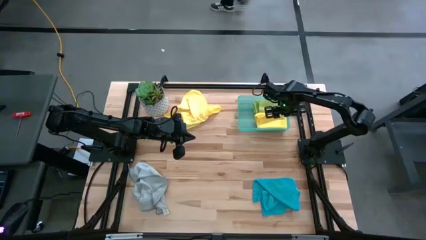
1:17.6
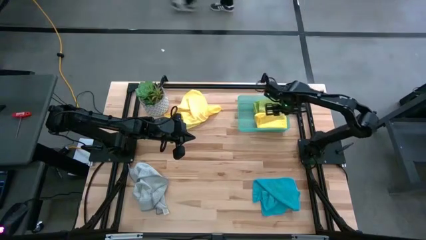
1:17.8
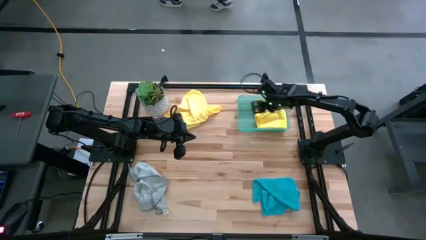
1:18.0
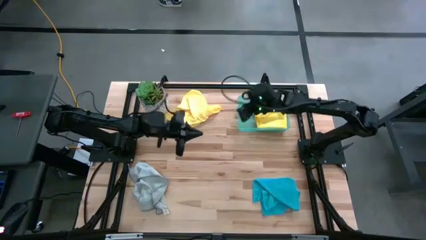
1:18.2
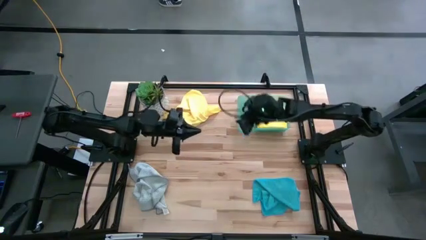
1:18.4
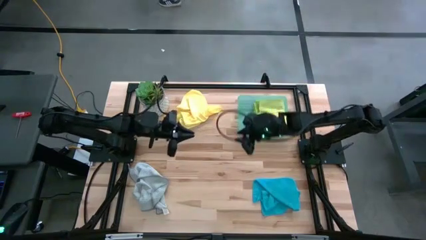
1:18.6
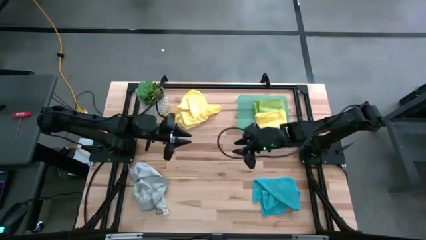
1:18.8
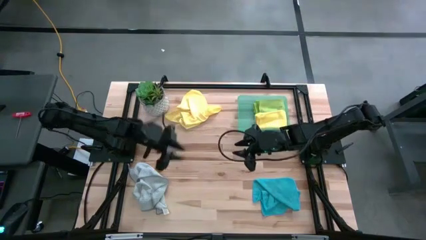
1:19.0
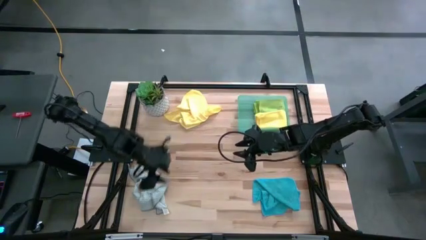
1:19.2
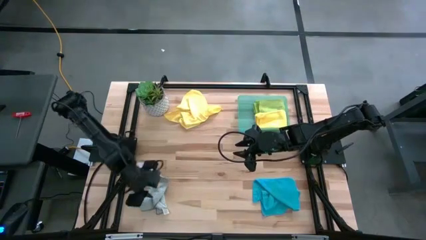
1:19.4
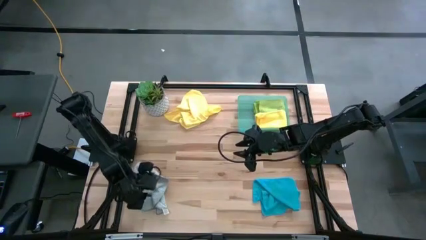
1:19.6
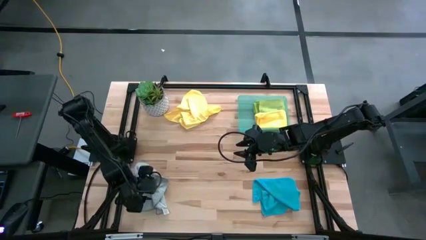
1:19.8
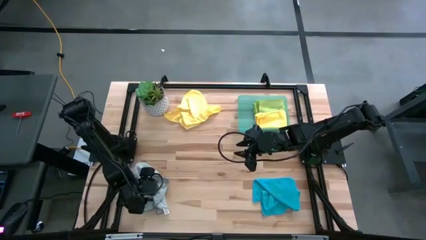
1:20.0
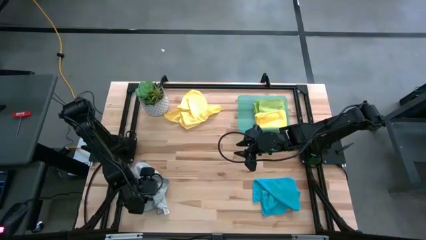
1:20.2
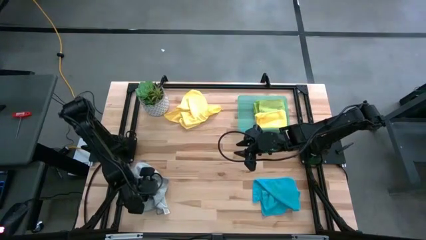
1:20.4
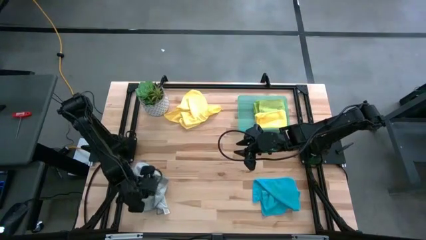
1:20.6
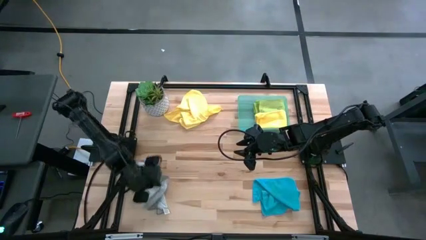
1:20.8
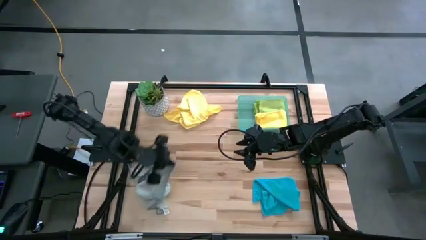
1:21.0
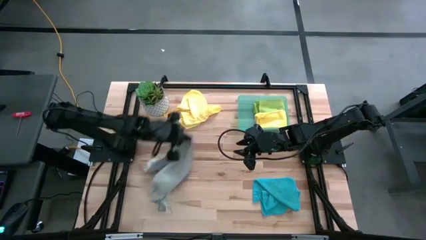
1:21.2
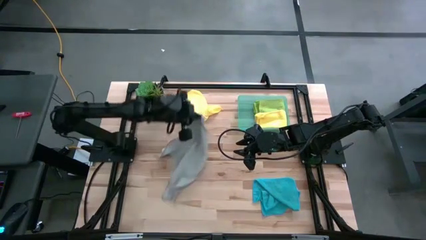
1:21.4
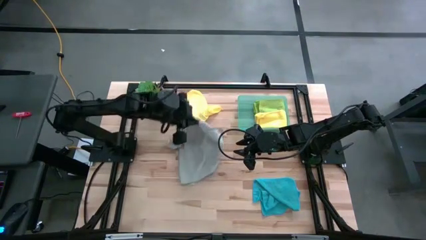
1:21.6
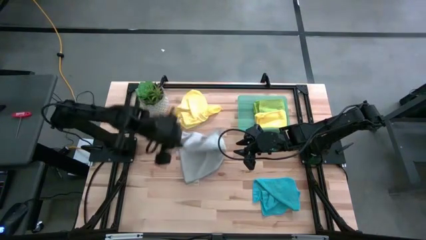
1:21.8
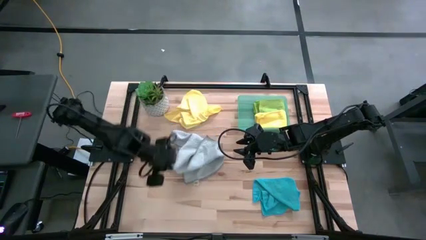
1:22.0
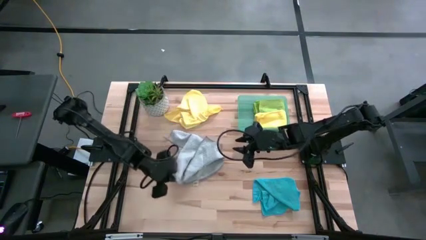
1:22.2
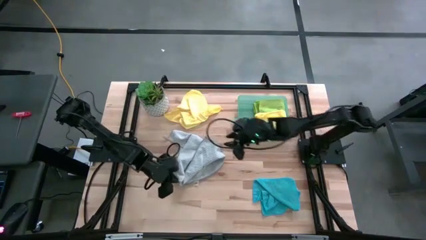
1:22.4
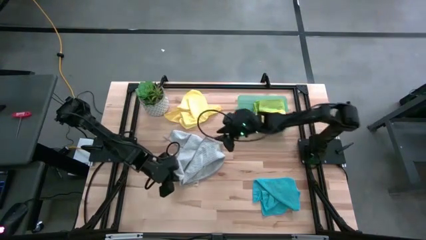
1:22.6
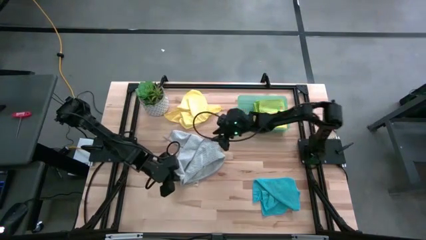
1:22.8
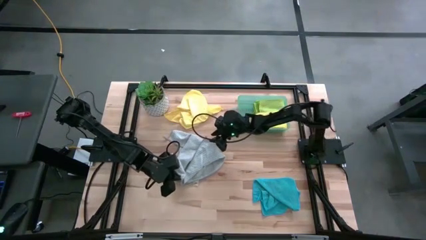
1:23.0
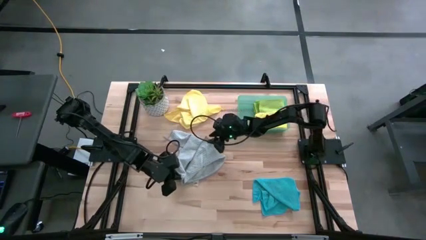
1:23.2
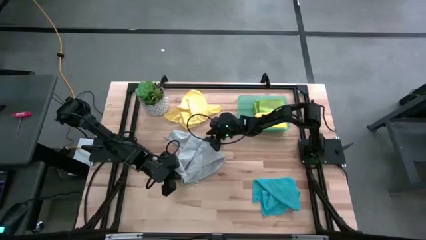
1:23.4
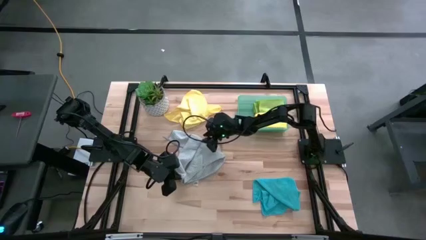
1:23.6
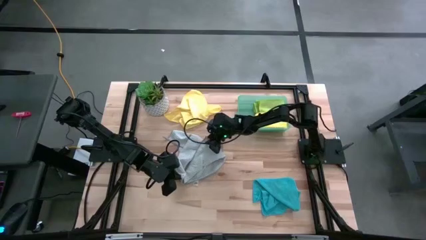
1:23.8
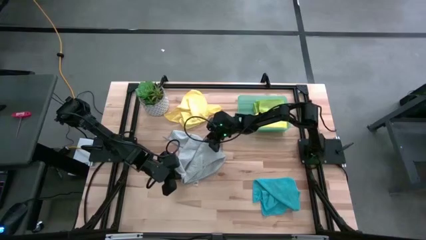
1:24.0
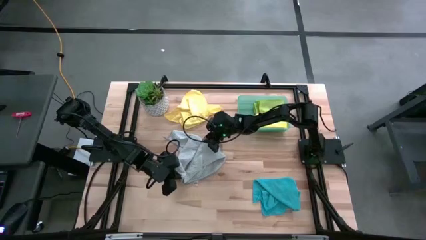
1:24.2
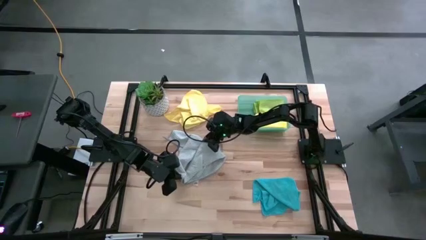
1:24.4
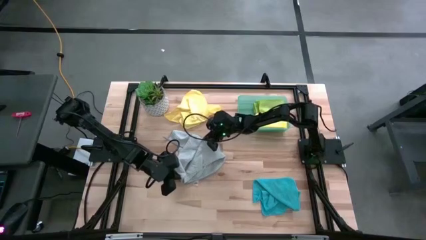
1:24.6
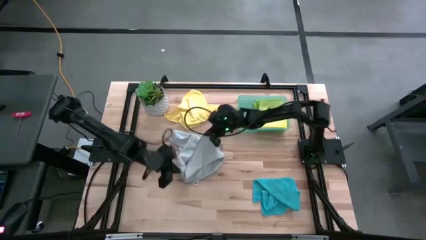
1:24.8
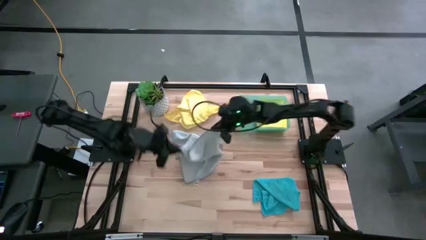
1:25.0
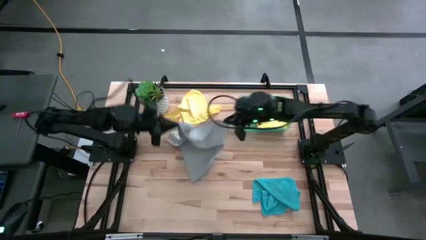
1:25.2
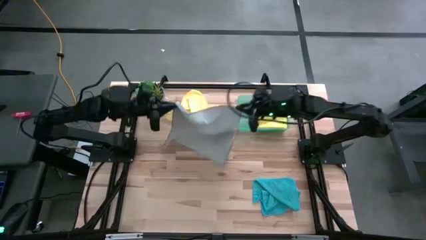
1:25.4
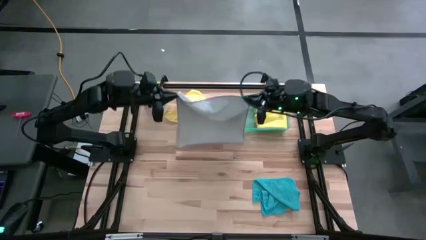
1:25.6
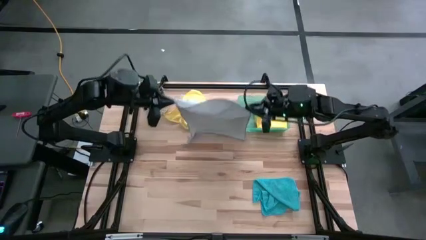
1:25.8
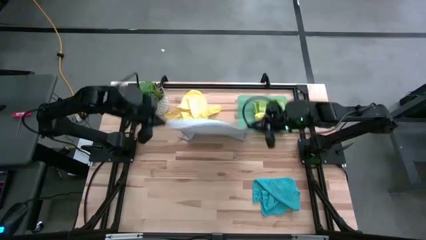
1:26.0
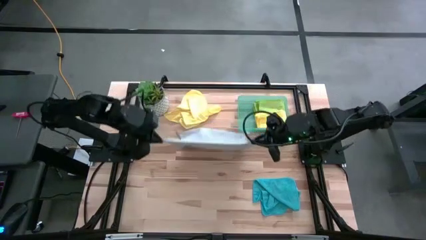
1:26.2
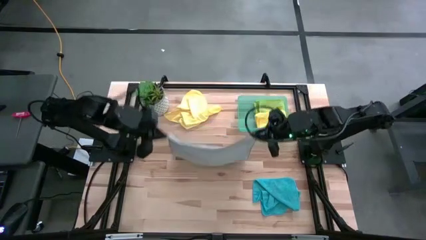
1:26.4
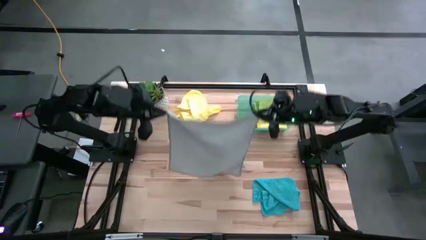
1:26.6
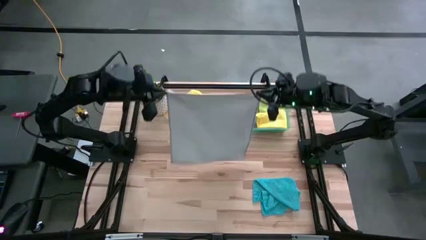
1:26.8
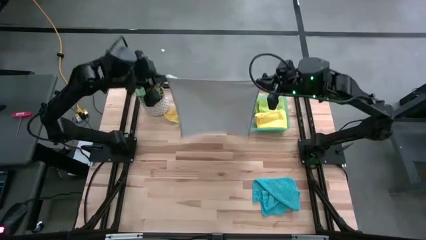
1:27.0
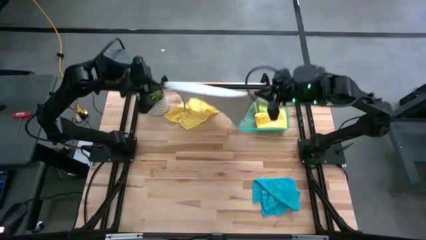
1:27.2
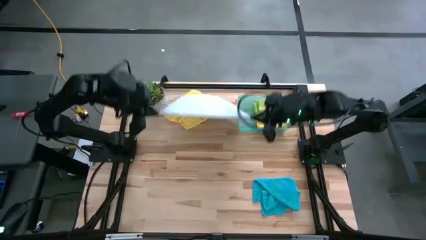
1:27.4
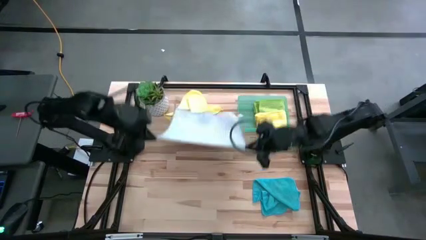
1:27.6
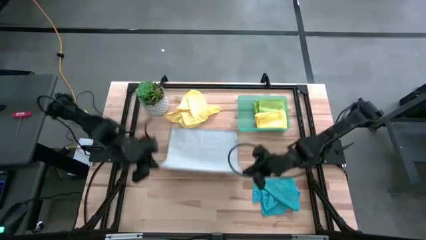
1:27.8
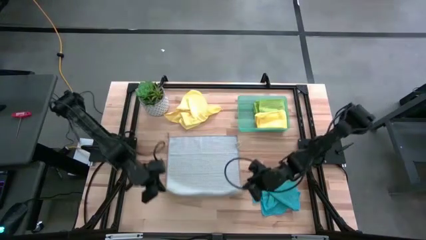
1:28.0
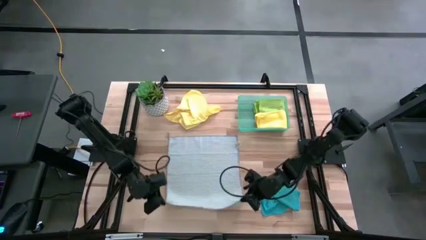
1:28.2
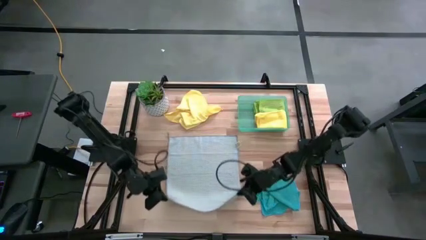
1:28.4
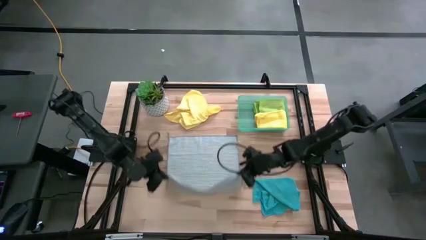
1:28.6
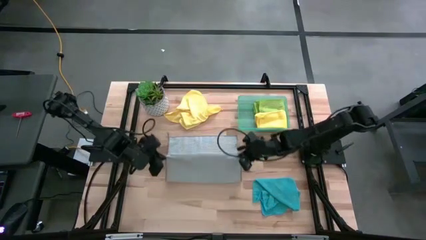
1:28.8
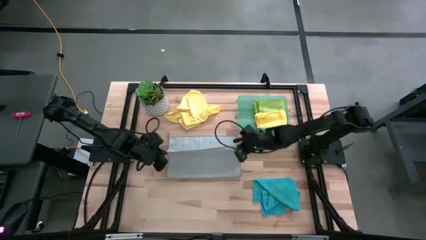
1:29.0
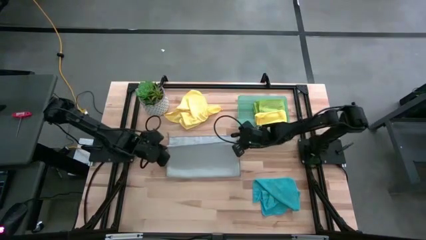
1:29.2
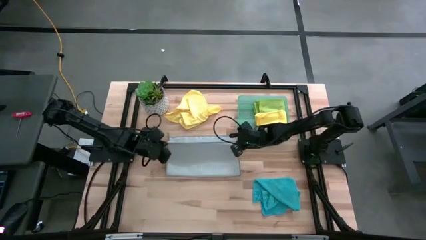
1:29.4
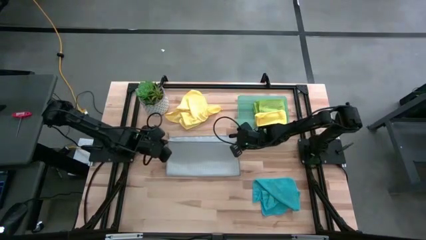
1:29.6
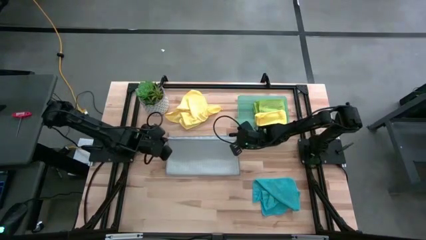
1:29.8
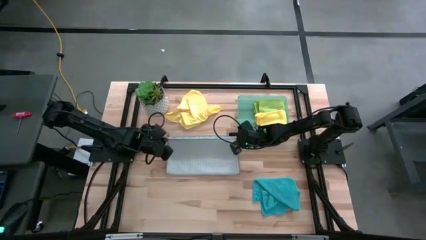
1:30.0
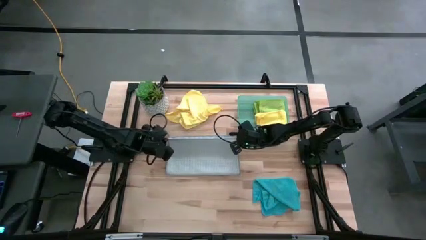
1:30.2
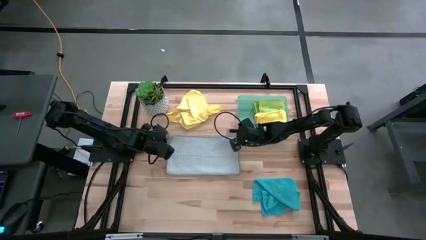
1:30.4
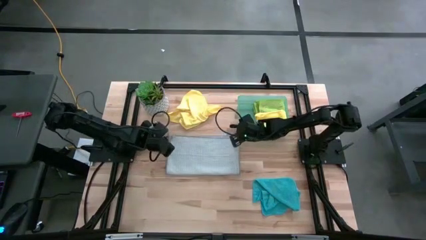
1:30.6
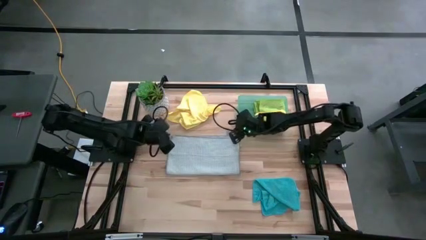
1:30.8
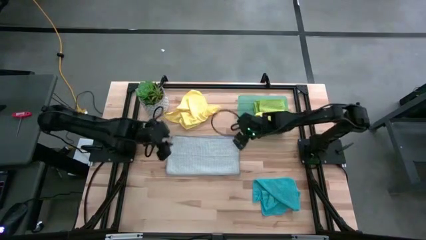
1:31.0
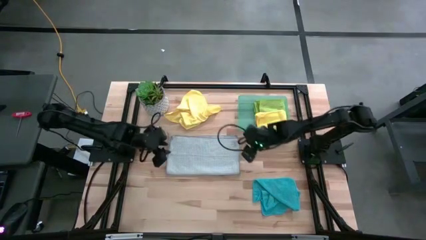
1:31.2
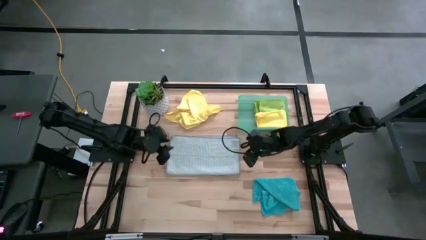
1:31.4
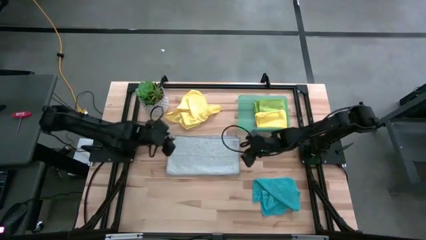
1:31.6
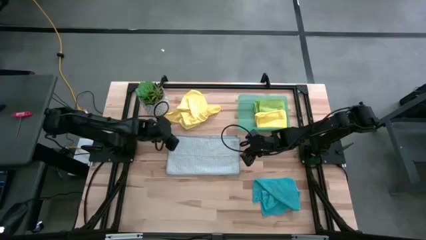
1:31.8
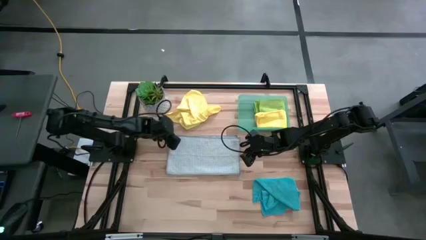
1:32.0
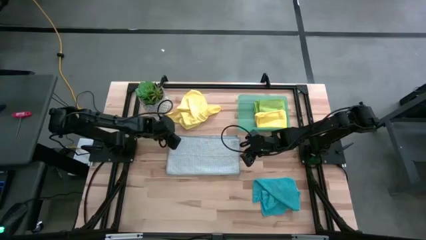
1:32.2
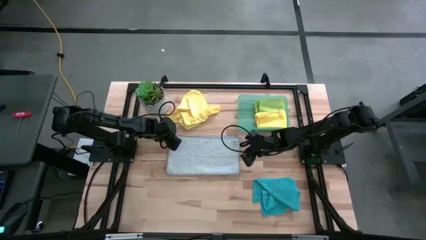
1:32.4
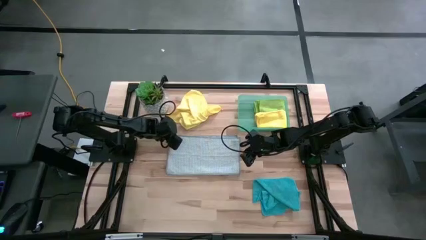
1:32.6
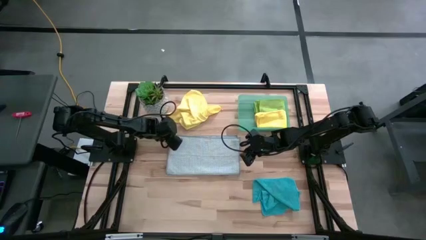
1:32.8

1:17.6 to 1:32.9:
Task: Fold microfiber towels
Fold the gray towel
